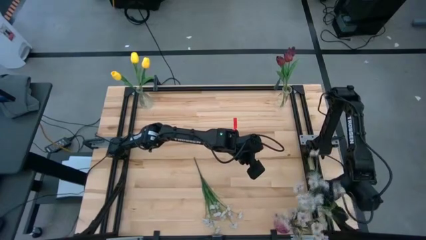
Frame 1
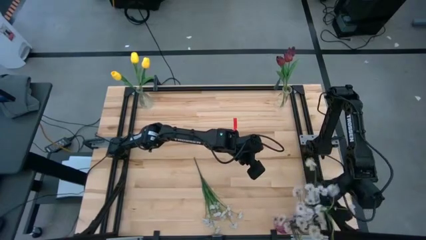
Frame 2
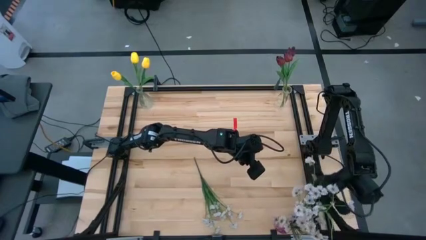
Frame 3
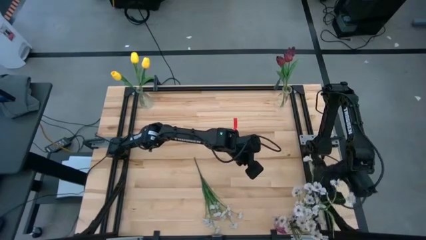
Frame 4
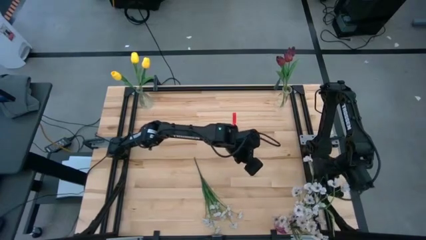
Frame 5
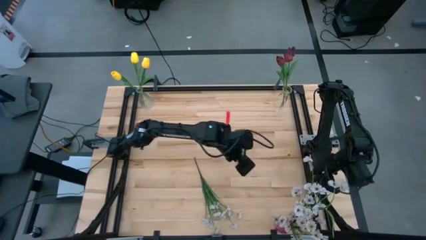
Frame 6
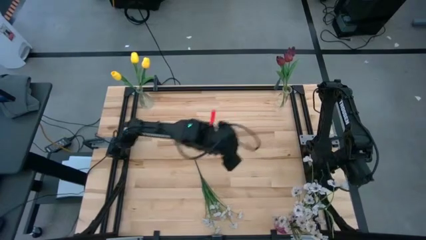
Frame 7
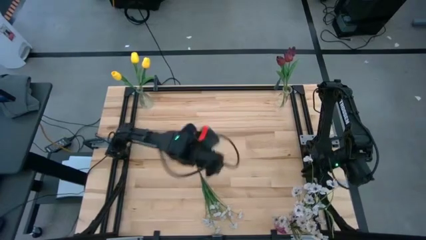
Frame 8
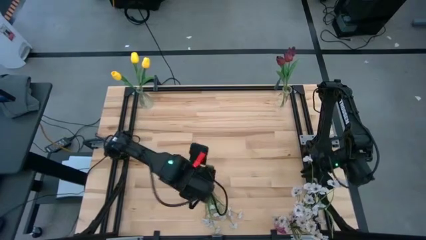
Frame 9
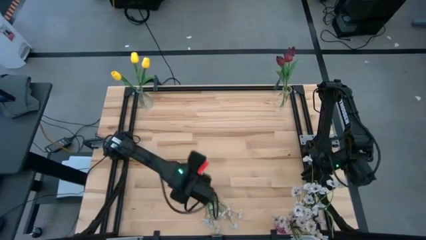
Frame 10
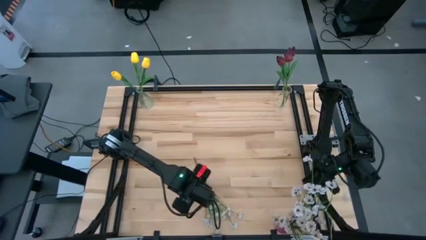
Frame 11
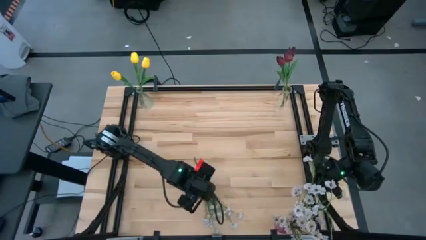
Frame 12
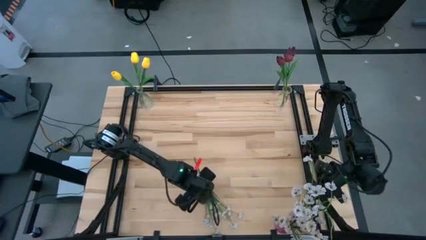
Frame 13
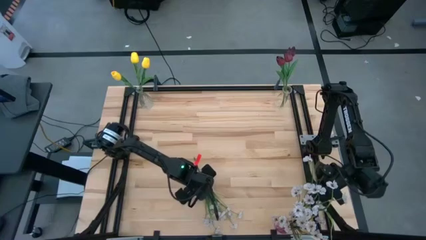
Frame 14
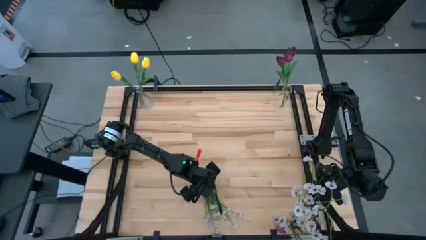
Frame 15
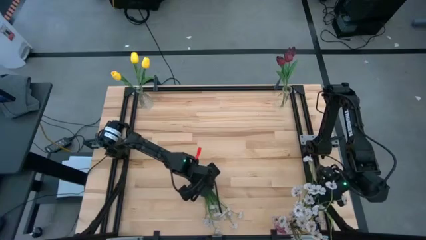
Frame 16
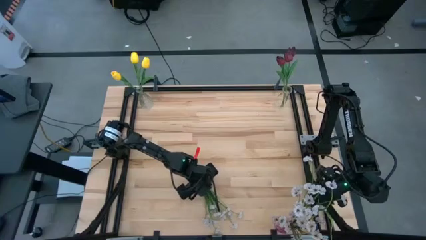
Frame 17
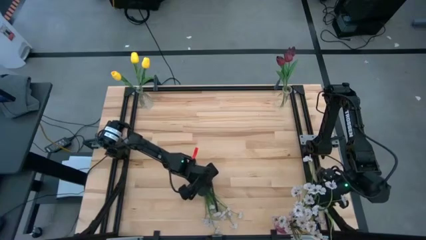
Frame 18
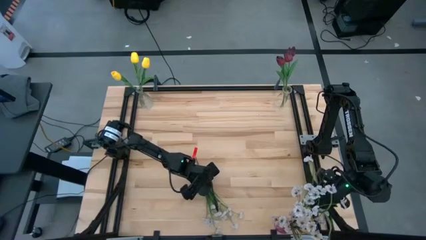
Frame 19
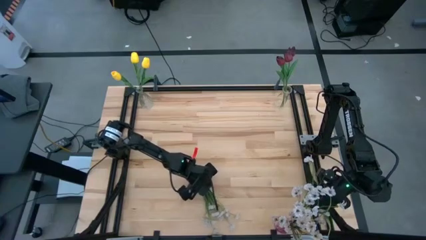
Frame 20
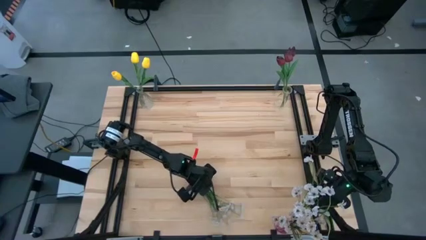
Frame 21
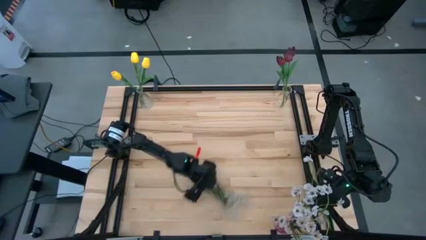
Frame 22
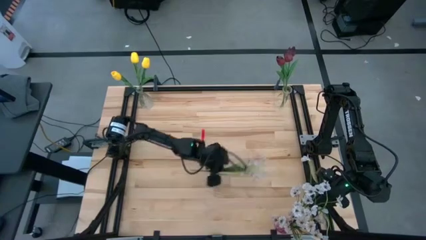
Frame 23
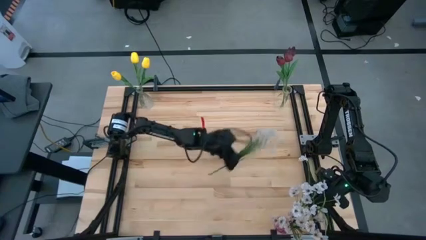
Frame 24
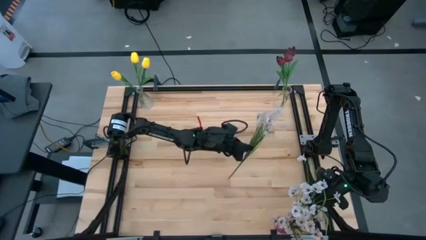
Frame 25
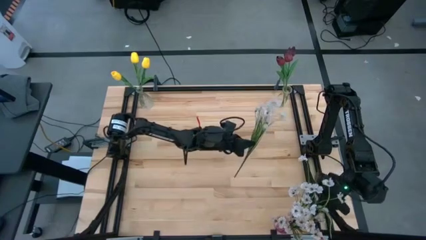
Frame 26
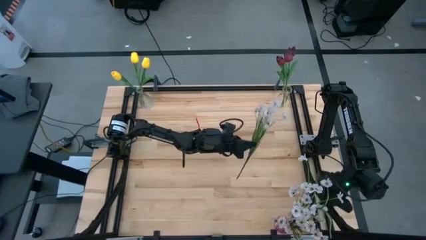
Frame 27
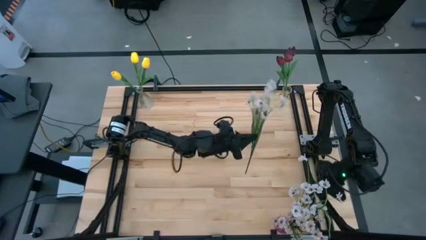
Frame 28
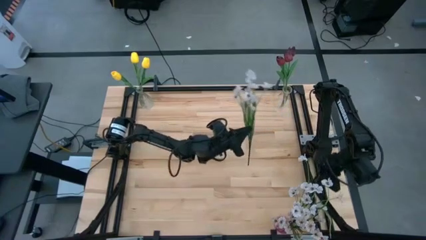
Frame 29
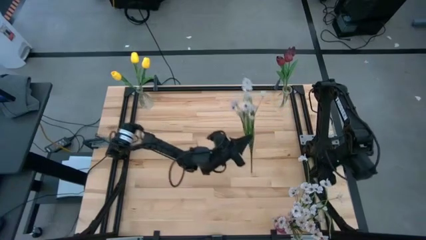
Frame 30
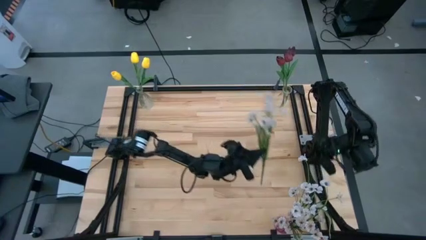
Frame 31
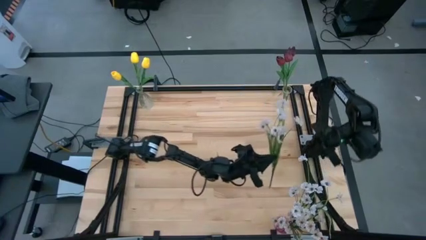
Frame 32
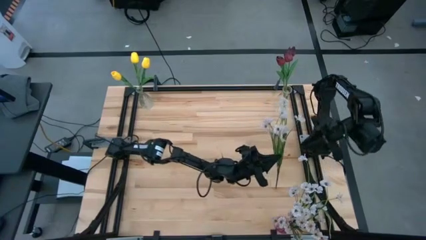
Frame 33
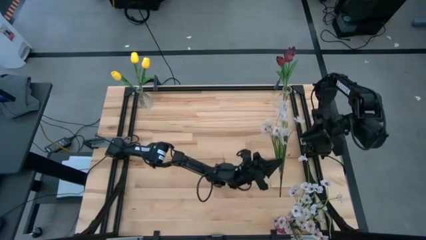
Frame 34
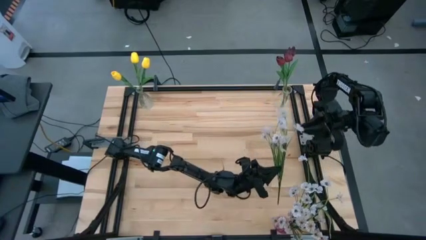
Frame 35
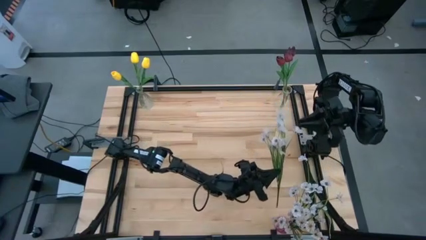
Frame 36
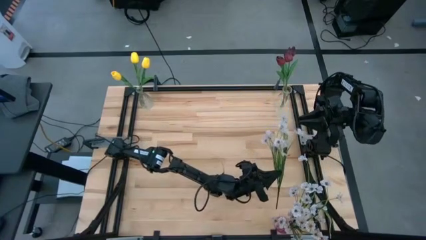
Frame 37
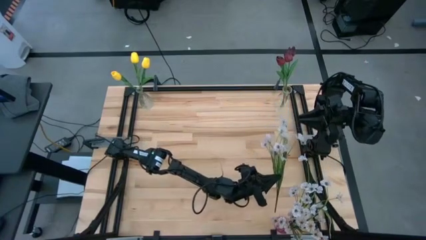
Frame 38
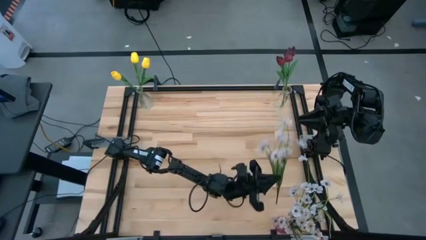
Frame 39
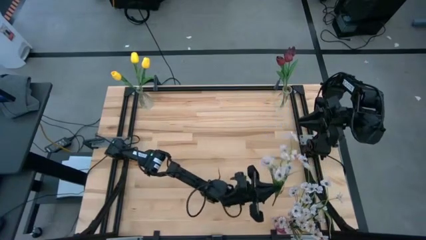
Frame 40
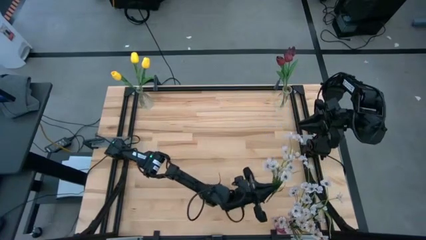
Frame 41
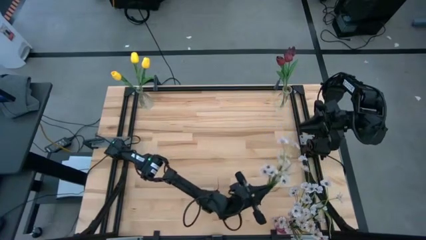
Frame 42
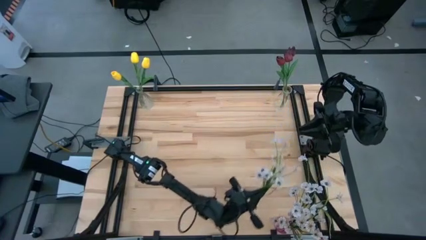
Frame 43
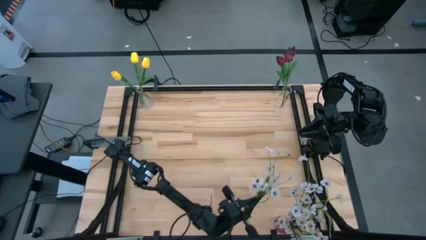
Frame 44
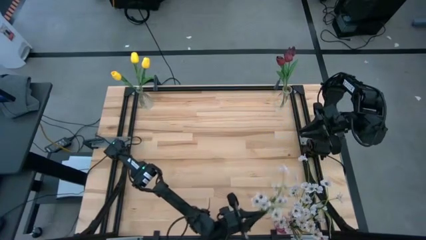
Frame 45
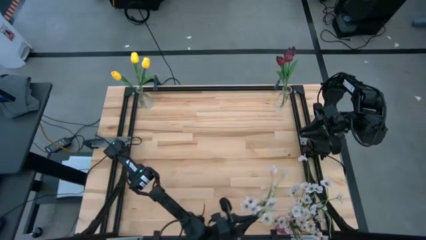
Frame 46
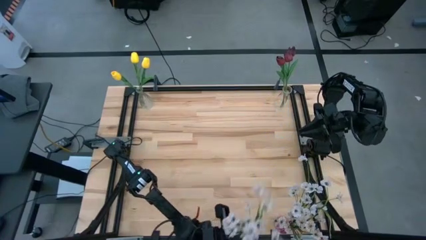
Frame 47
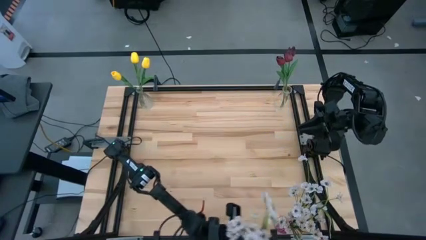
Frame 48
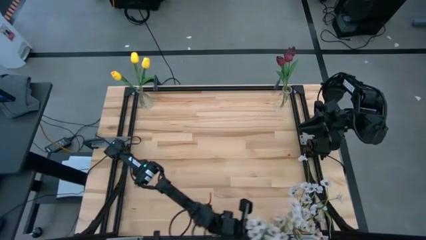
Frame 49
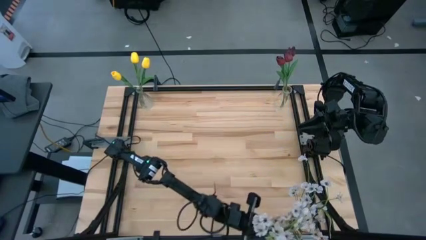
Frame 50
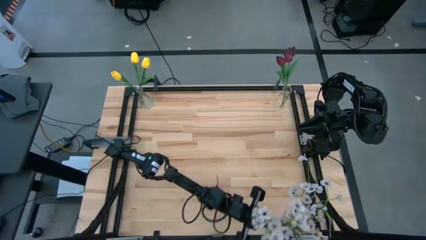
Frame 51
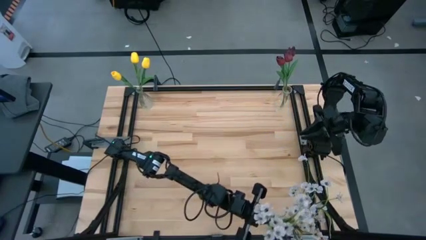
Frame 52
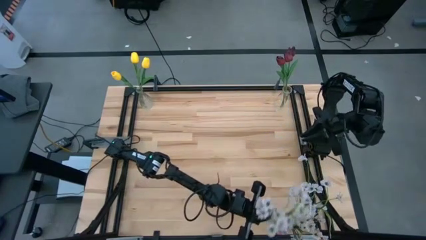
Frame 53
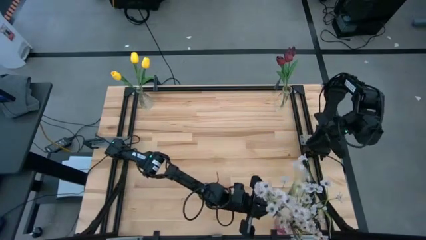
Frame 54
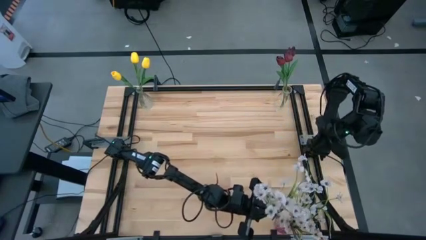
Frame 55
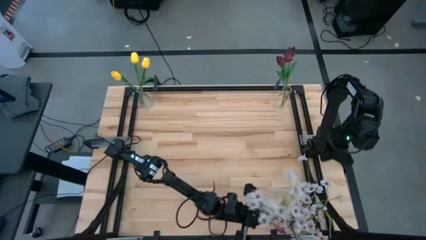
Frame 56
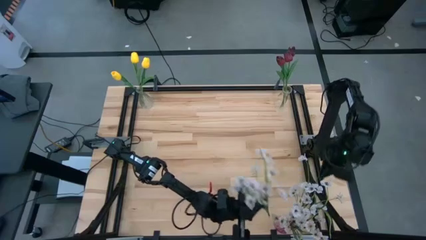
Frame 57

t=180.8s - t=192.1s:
Task: Sort flowers into vase by color
Put the white flowers into the purple vase
